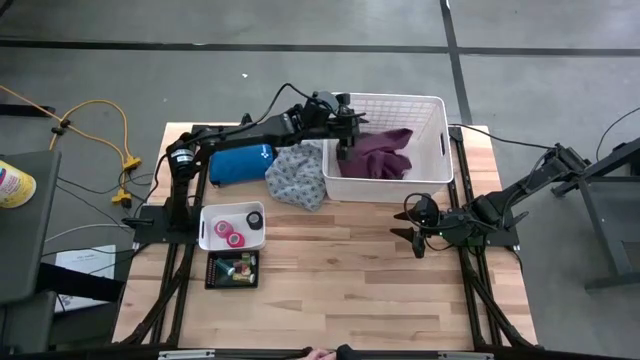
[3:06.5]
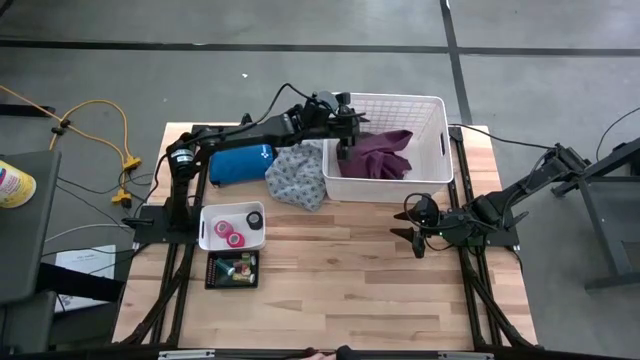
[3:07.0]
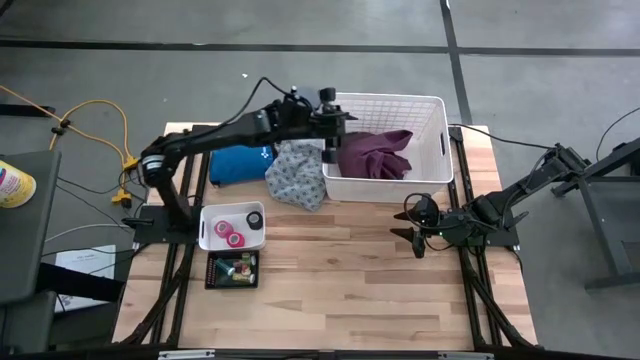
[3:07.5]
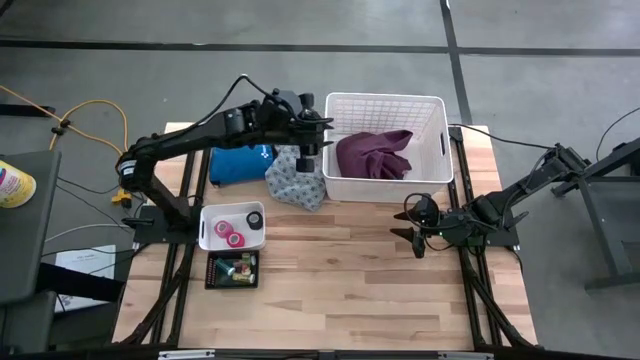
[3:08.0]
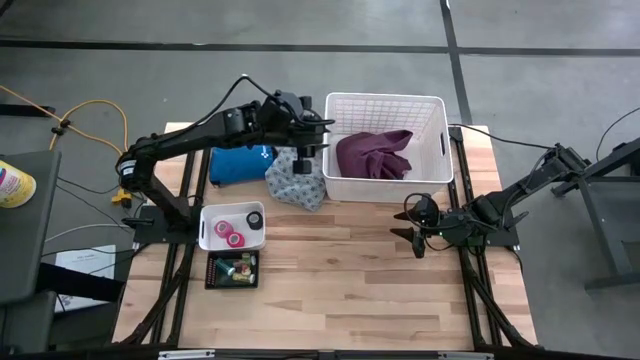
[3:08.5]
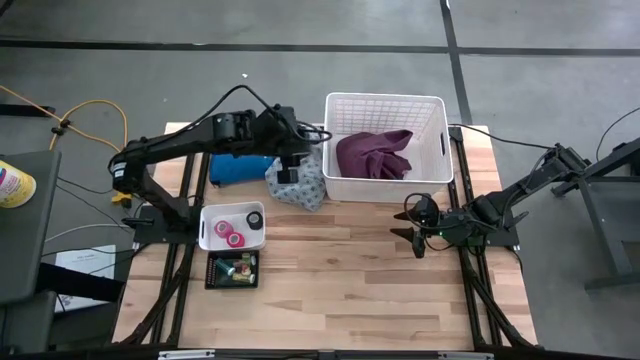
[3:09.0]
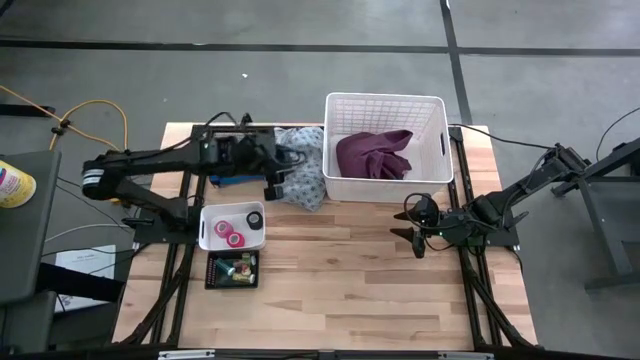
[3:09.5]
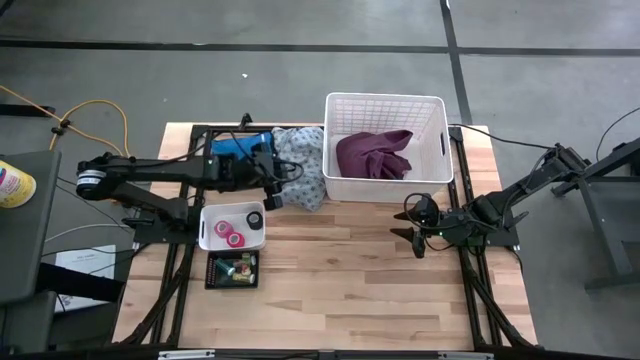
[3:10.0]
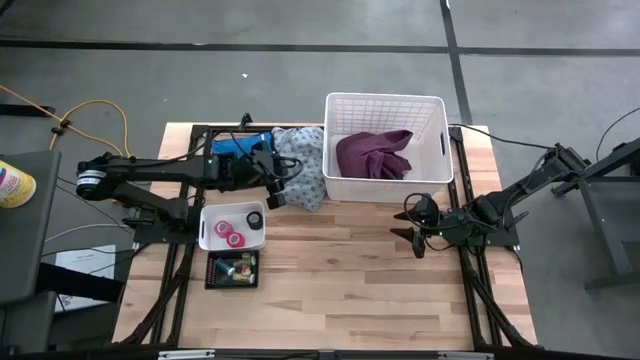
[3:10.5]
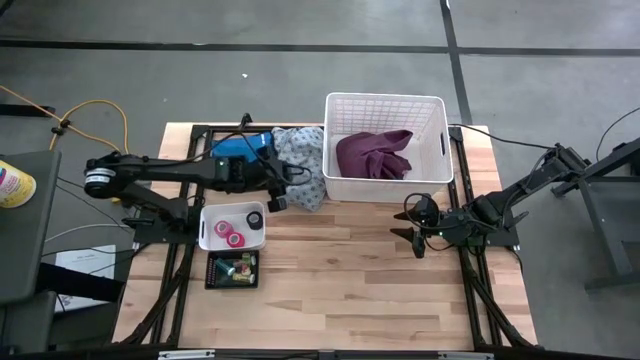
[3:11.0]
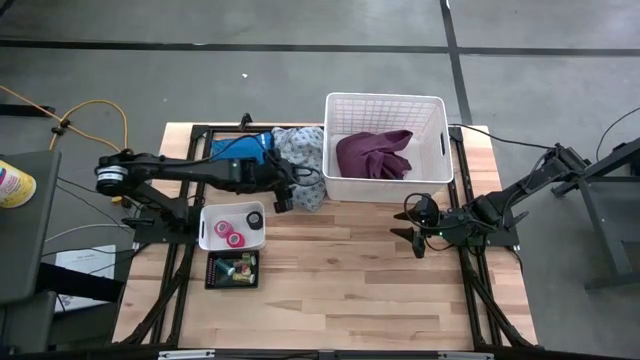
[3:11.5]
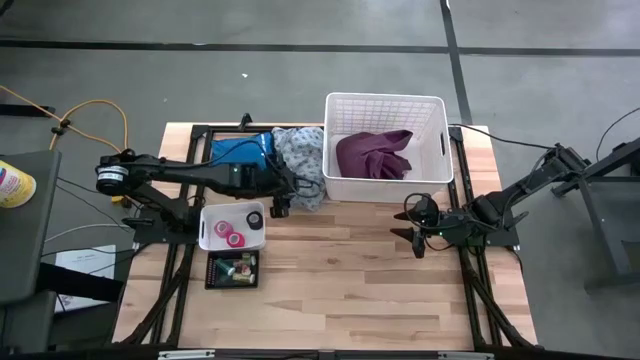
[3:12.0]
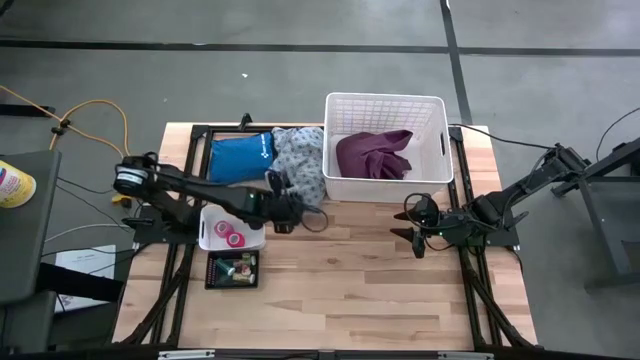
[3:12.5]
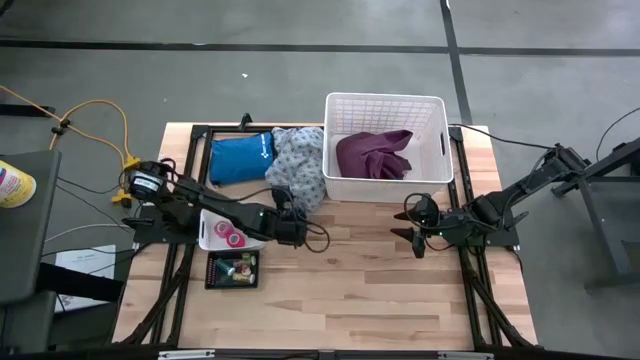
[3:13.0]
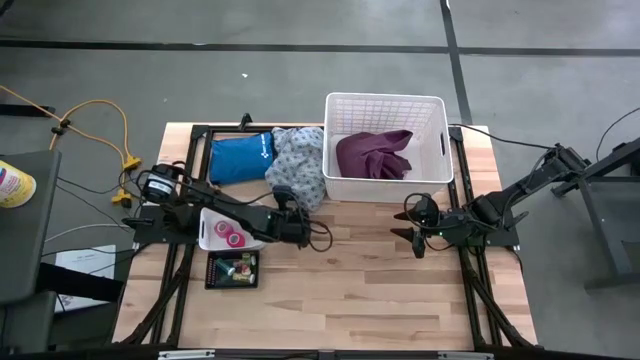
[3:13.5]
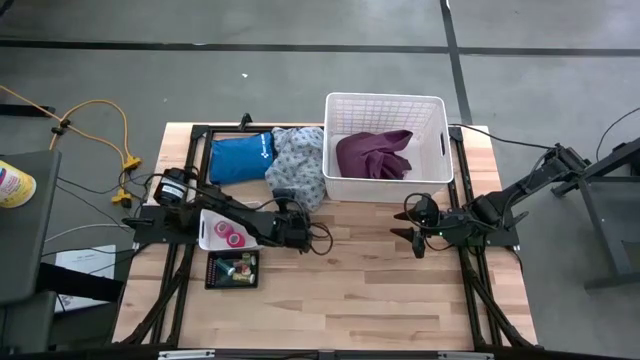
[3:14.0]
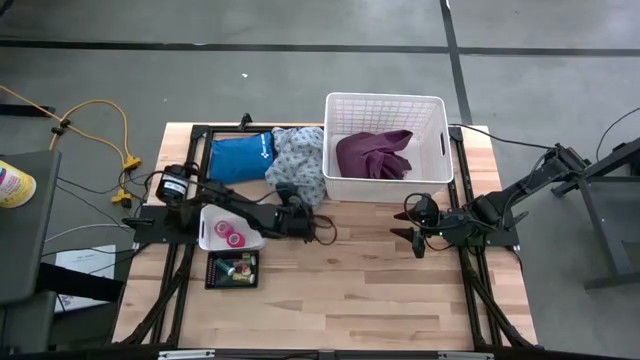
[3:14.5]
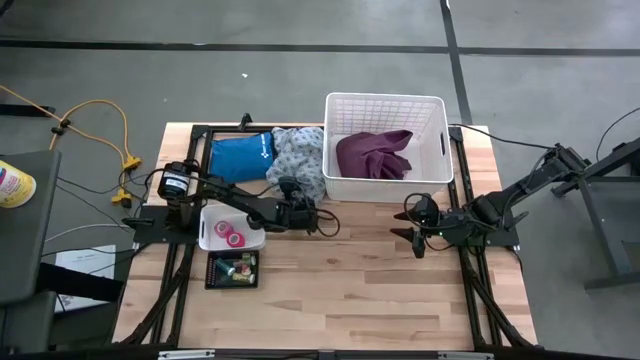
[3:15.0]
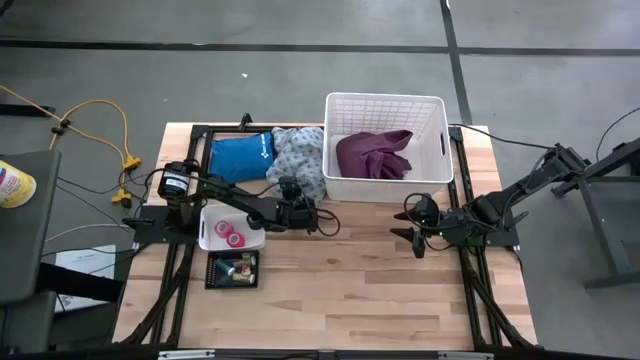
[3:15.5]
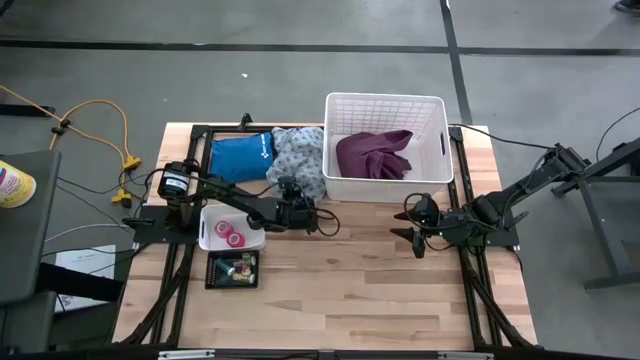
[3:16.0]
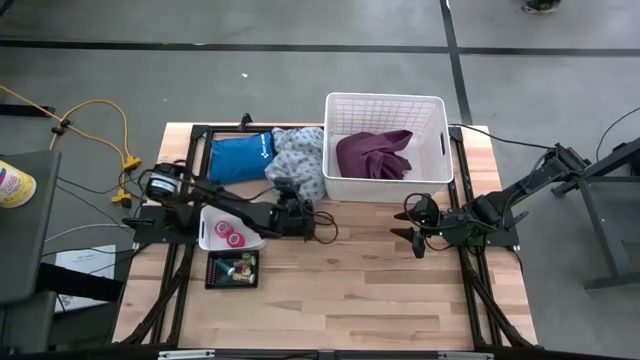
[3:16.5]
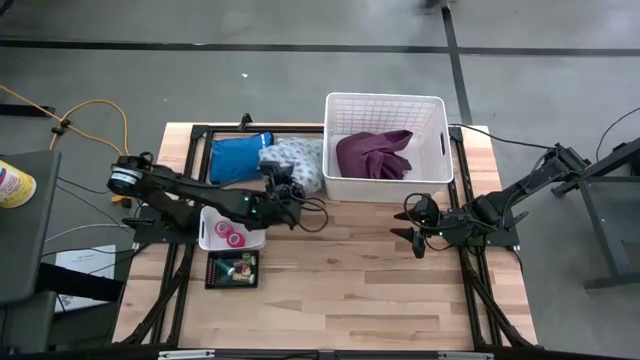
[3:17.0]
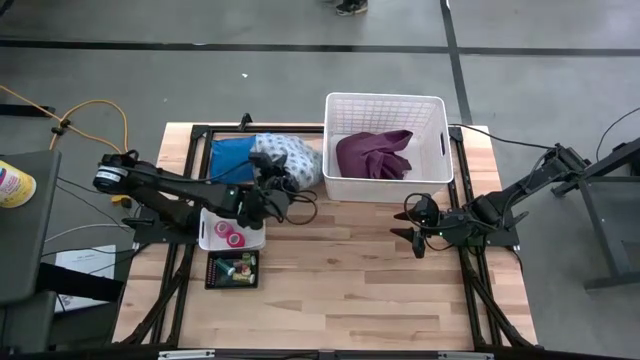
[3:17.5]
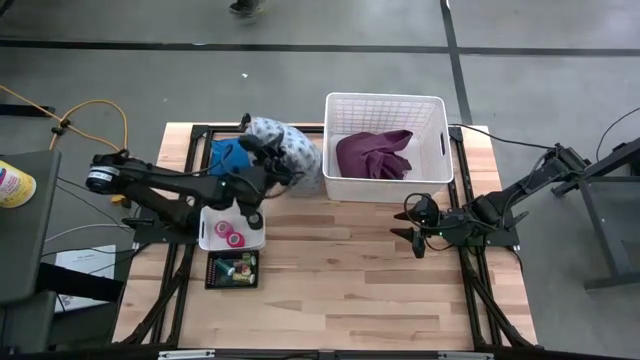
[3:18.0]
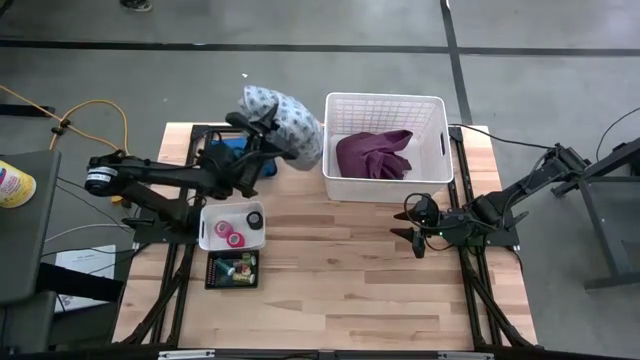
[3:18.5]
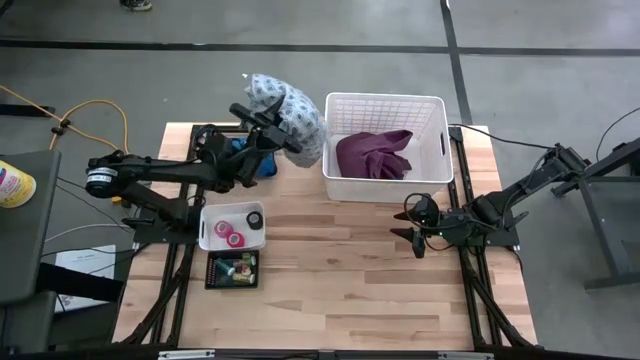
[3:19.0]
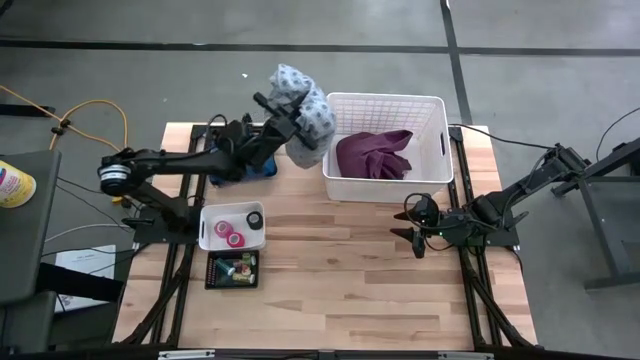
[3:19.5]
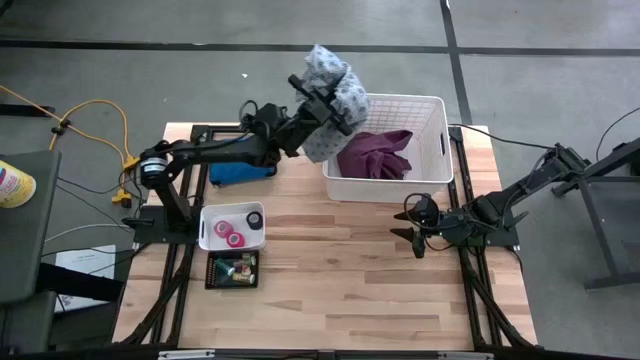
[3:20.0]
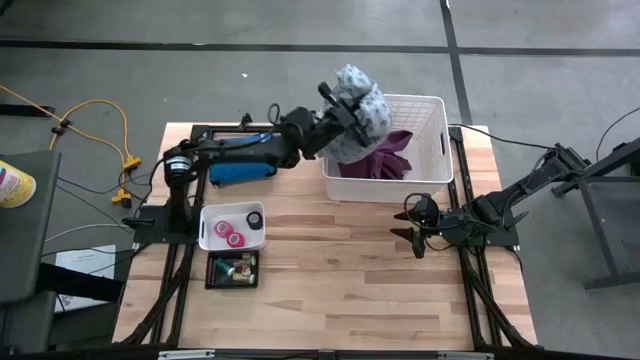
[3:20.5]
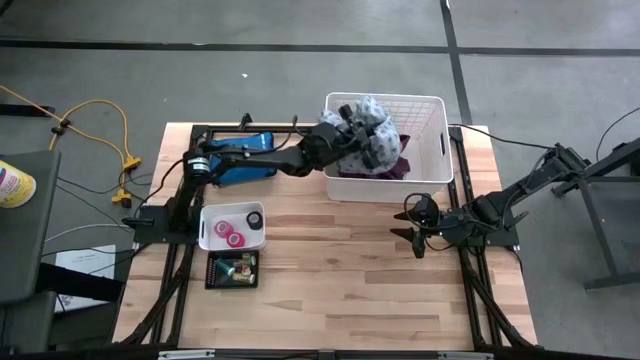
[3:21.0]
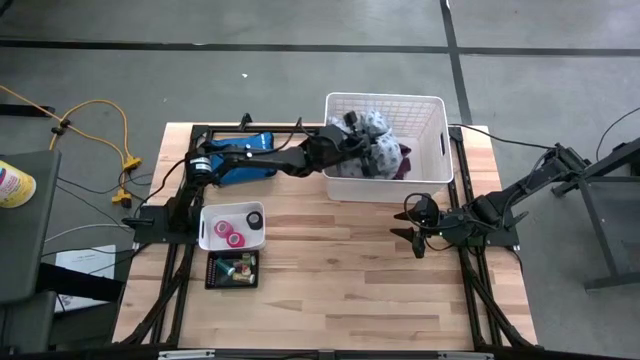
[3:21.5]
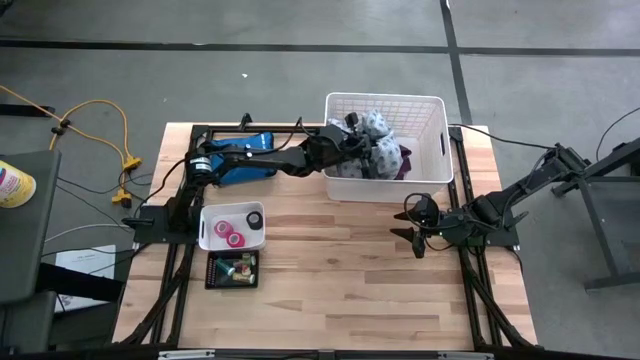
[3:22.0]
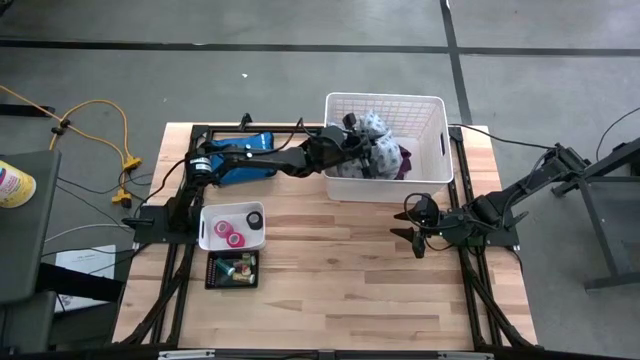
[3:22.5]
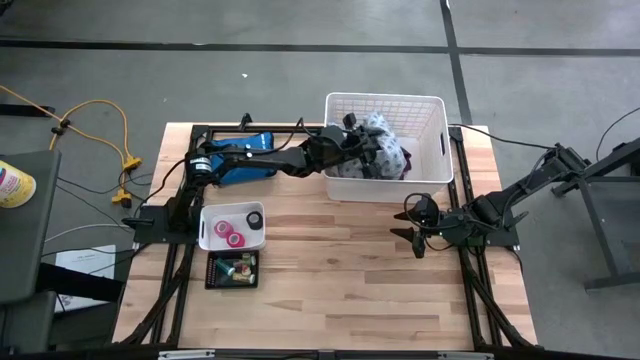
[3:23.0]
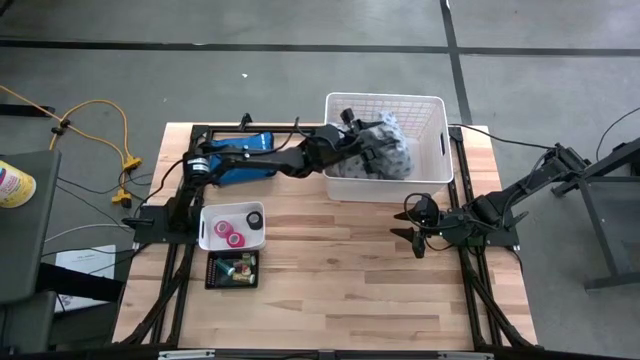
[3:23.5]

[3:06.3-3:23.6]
Task: Pick & place medical supplies in basket/bin
Put the blue patient gown into the white bin

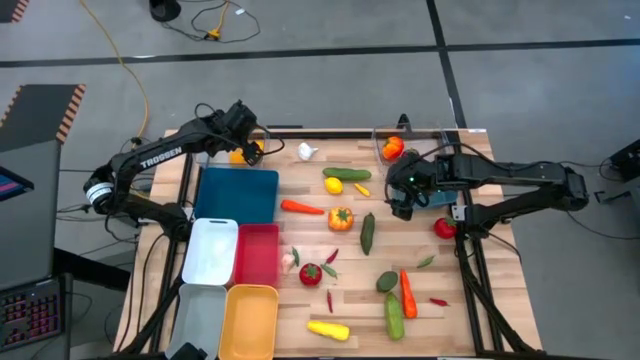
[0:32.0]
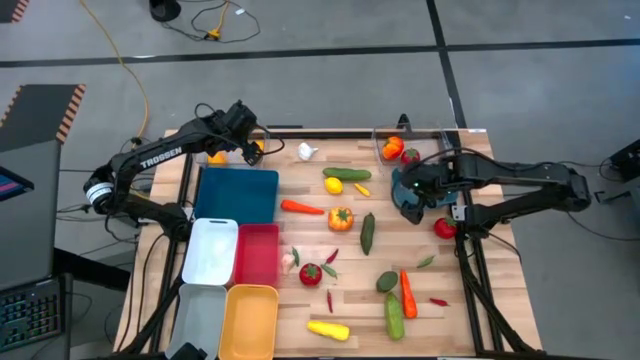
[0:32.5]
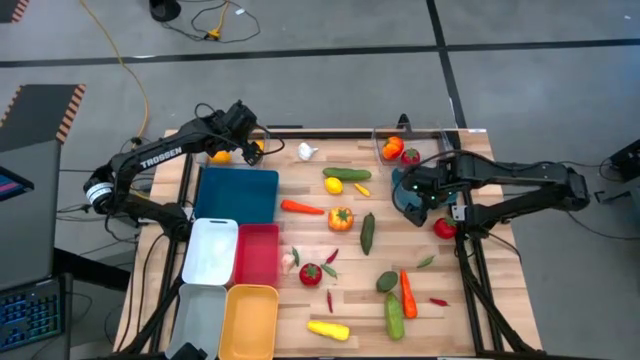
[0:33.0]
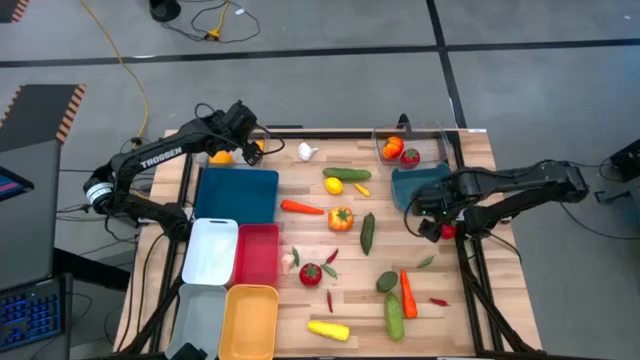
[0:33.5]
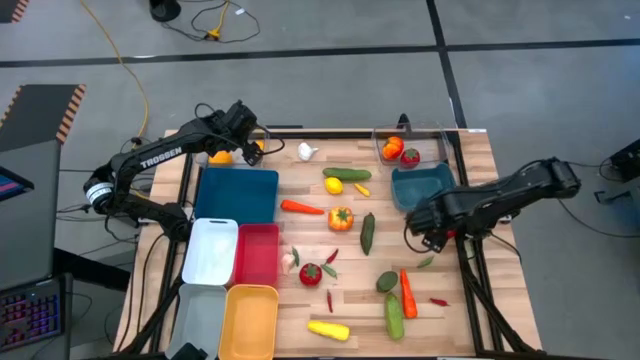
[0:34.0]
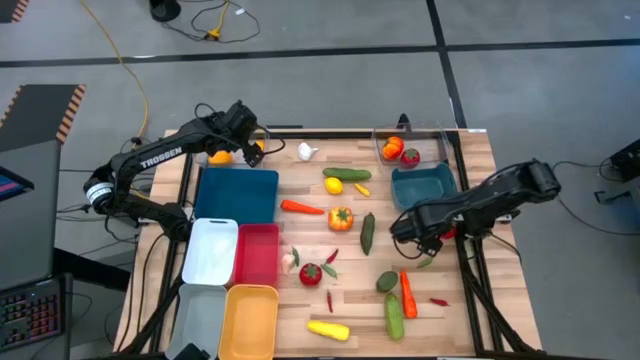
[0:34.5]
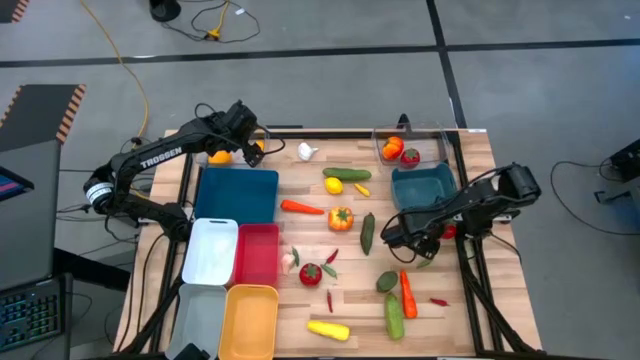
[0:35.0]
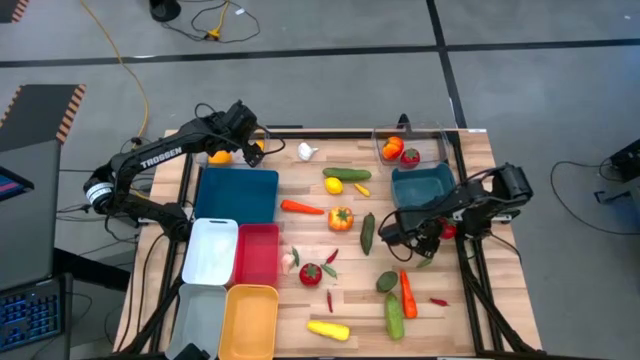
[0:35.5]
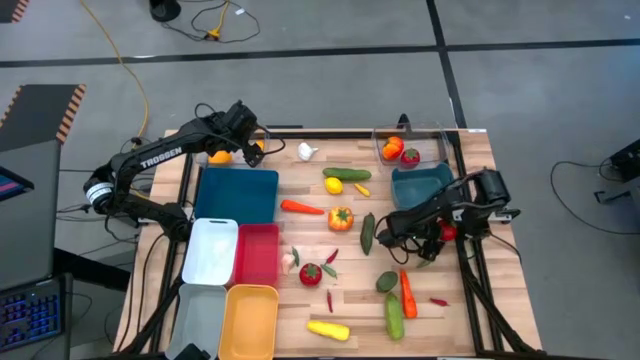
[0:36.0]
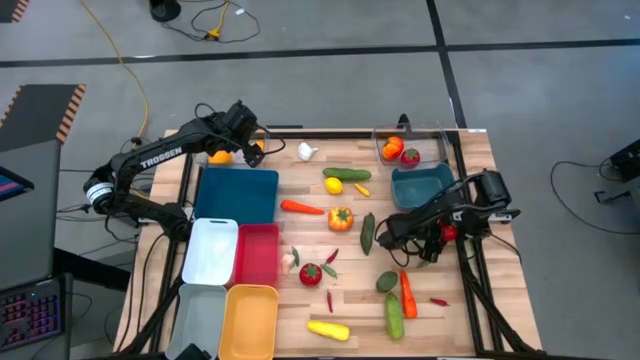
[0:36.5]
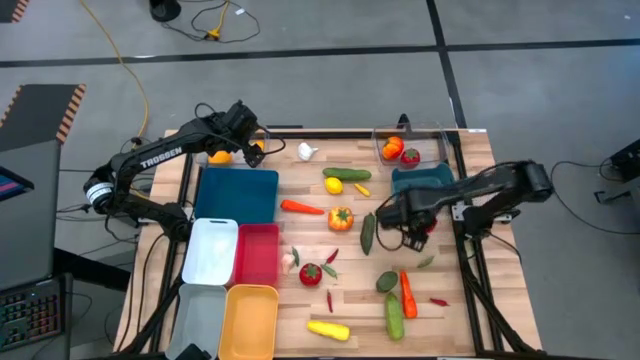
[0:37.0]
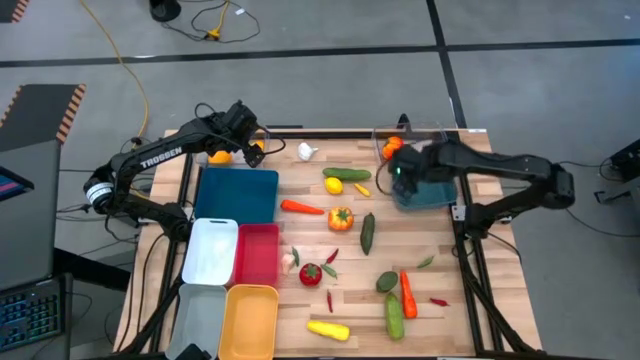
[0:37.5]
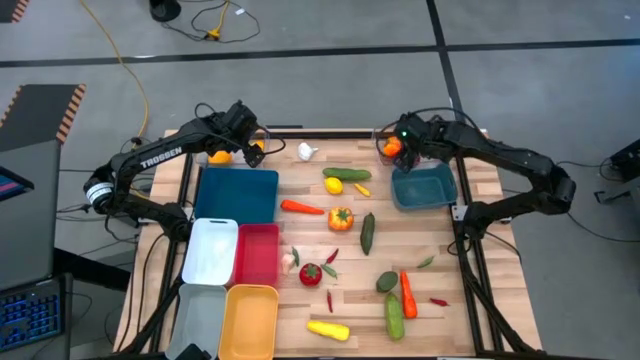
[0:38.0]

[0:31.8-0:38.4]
Task: Sort produce into baskets
Put the right red tomato into the right transparent bin
